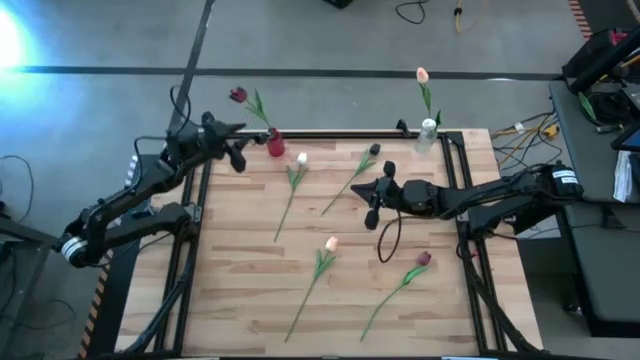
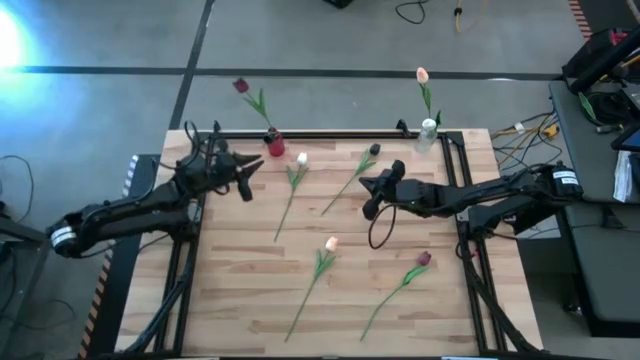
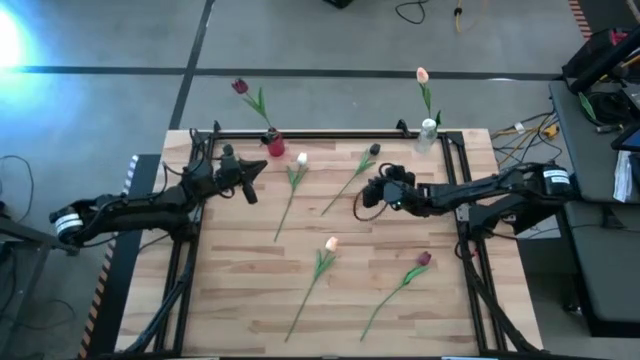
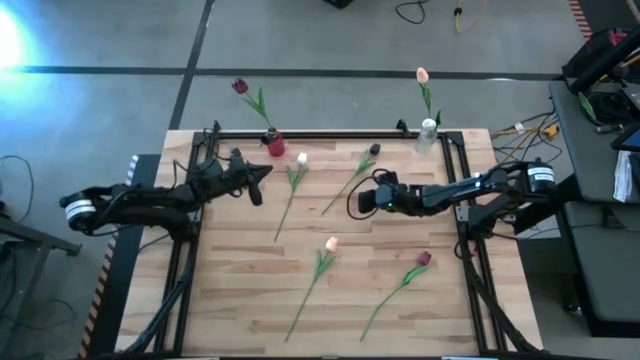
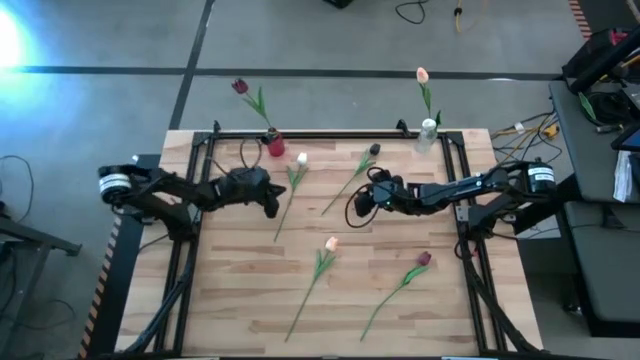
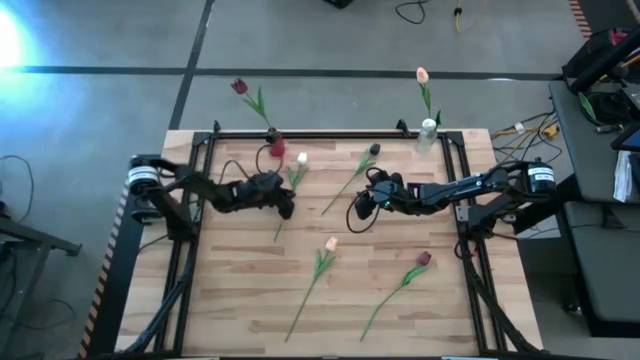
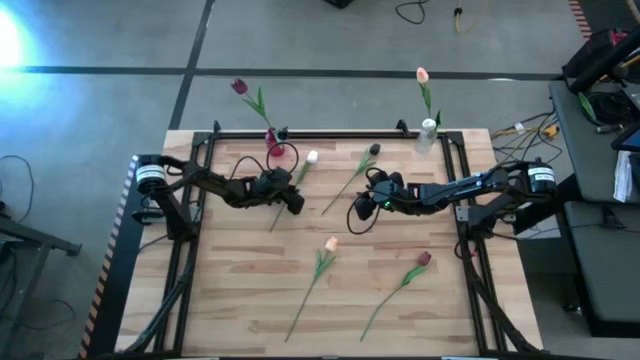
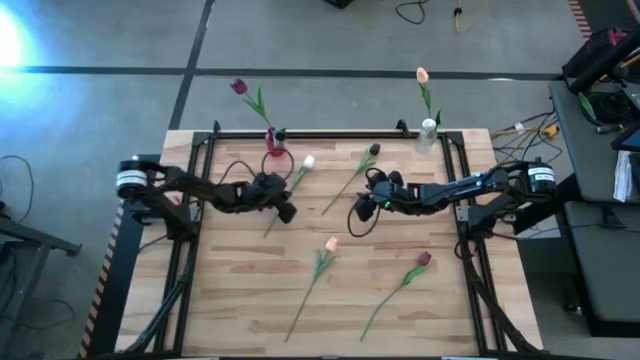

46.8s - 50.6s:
Task: Sort flowers into vase by color
Put the white tulip into the transparent vase

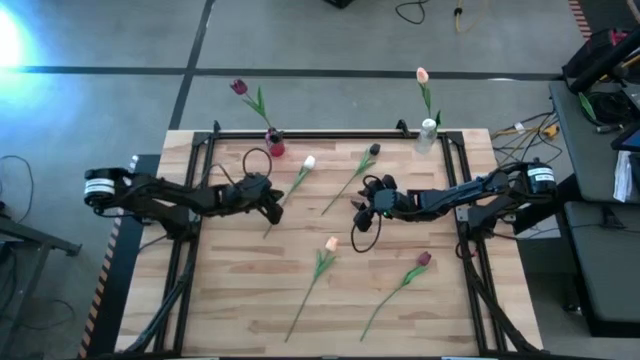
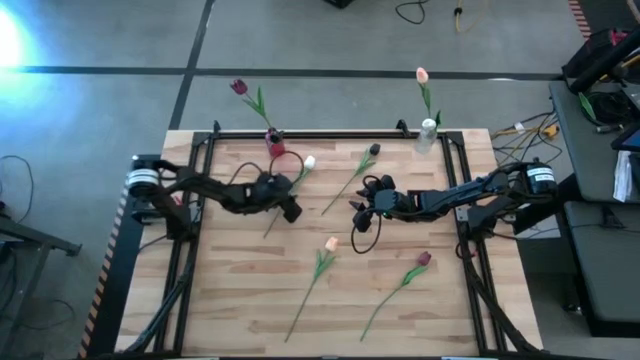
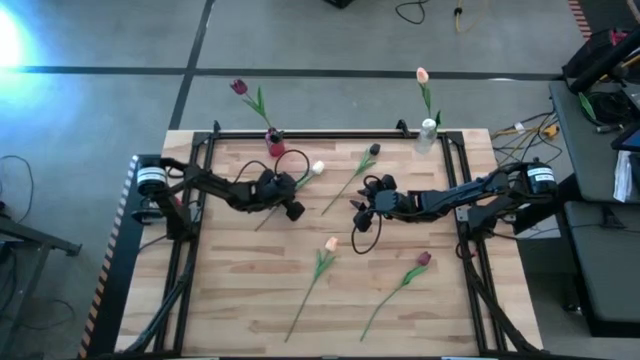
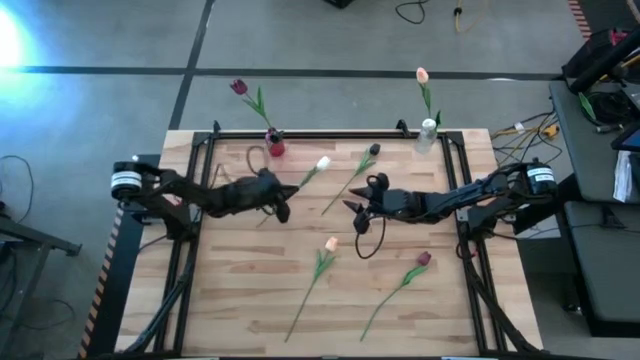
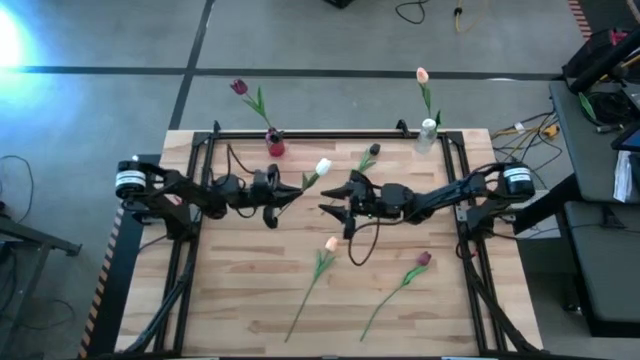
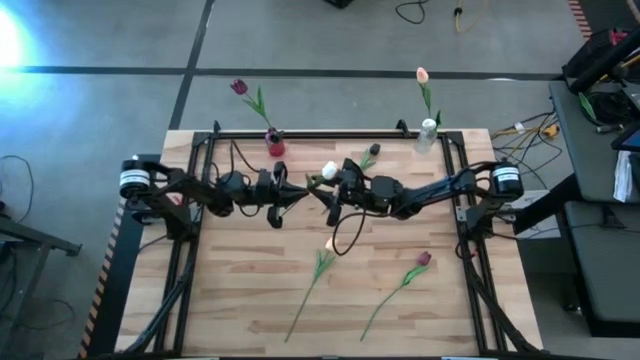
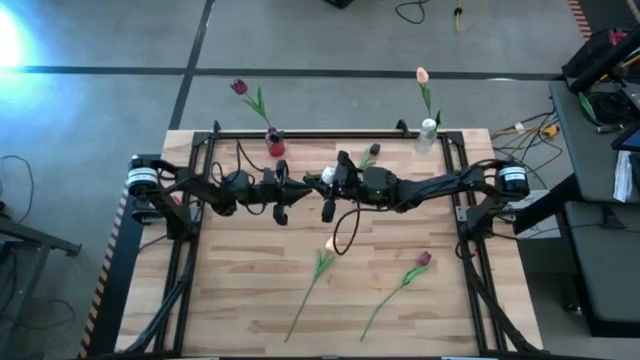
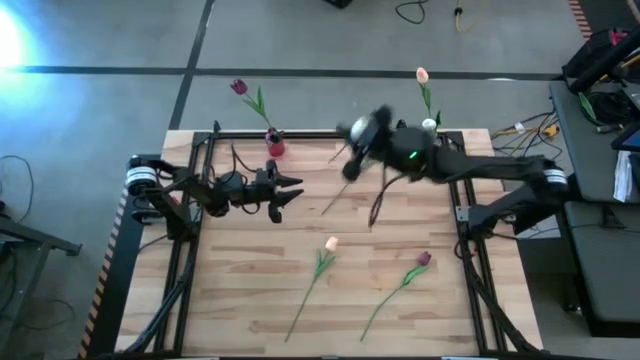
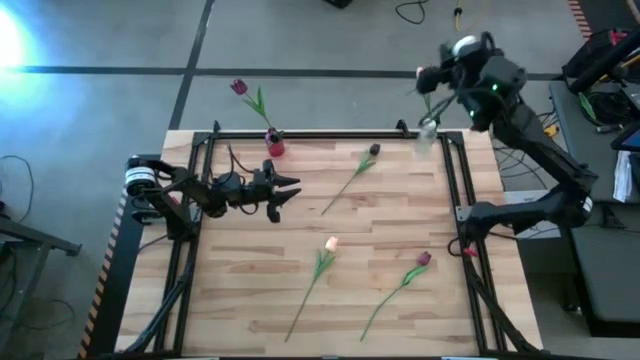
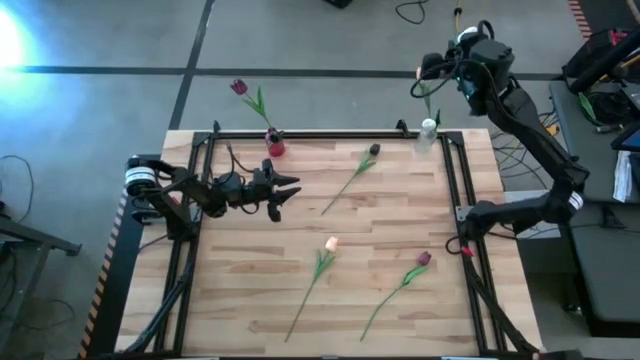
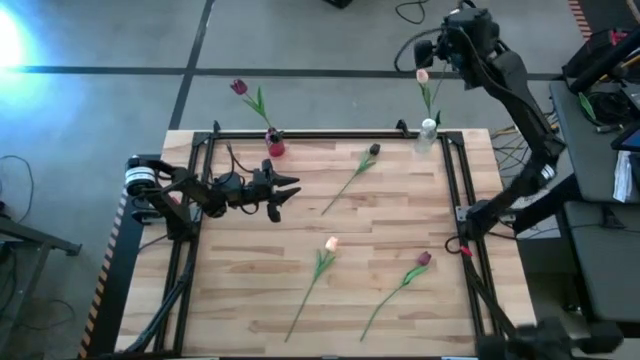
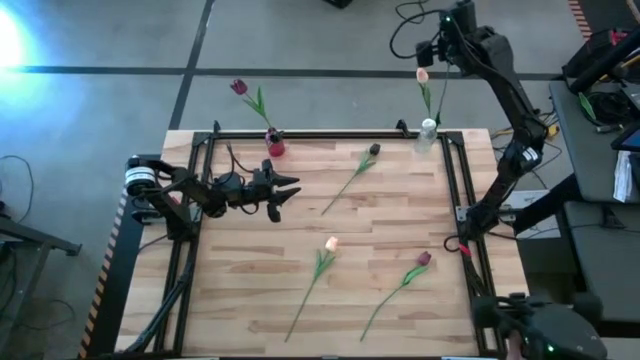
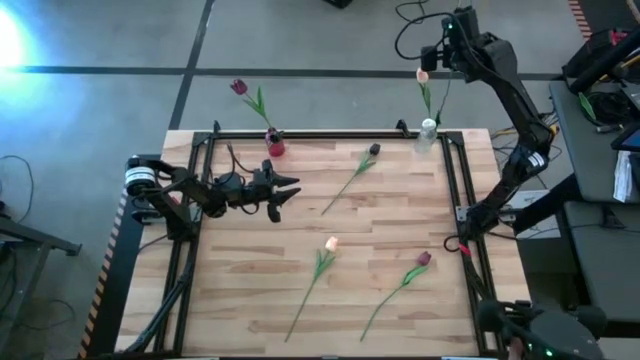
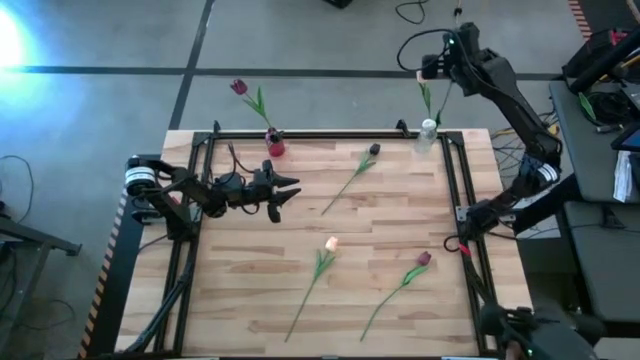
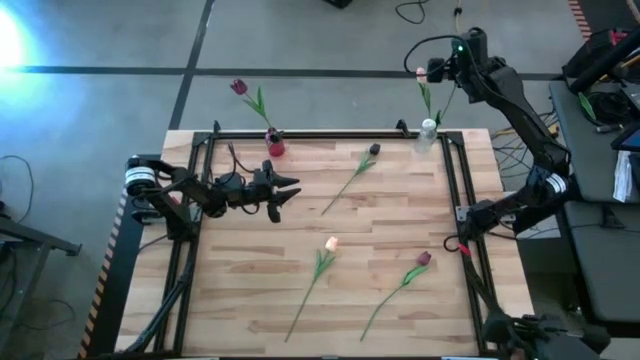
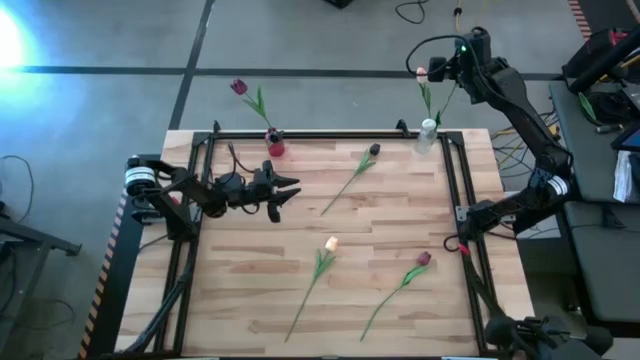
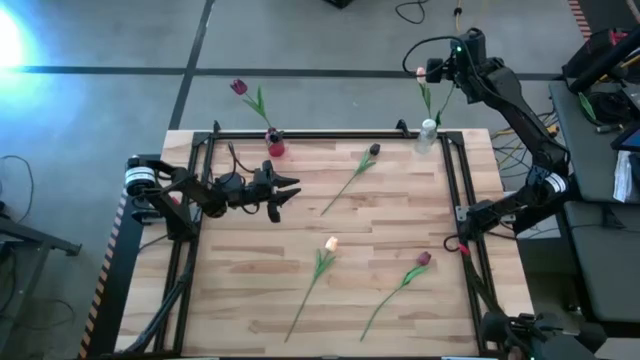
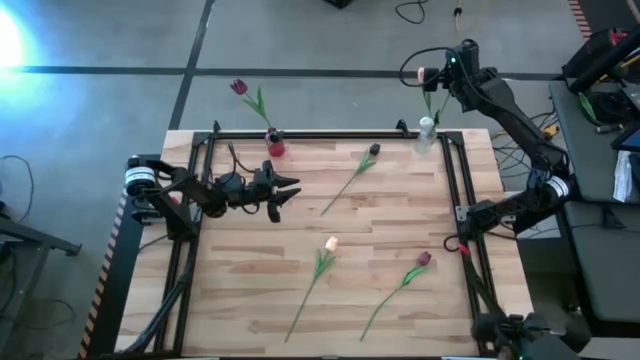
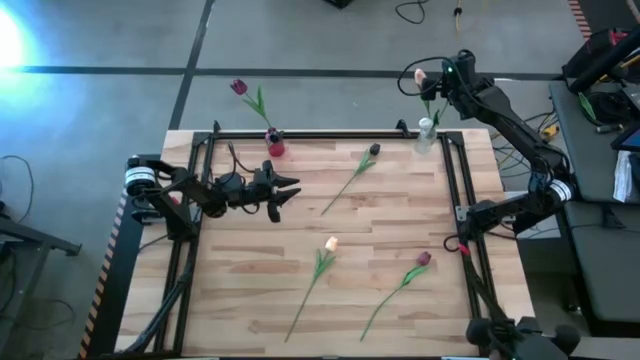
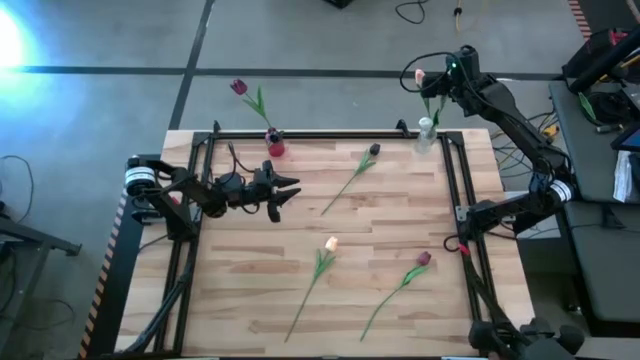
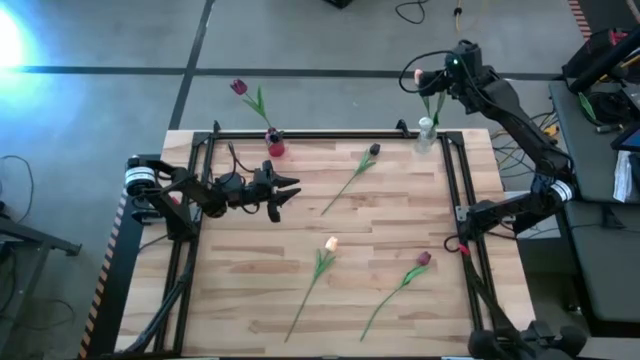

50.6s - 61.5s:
Put the white tulip into the transparent vase

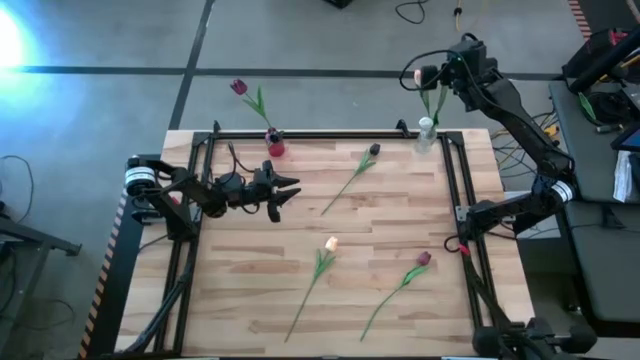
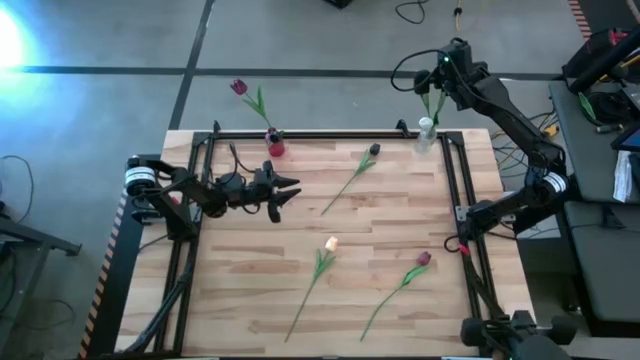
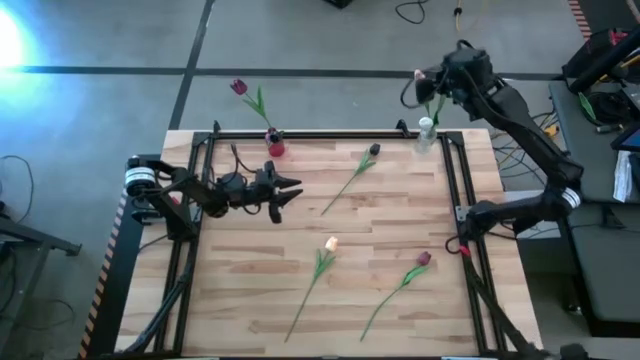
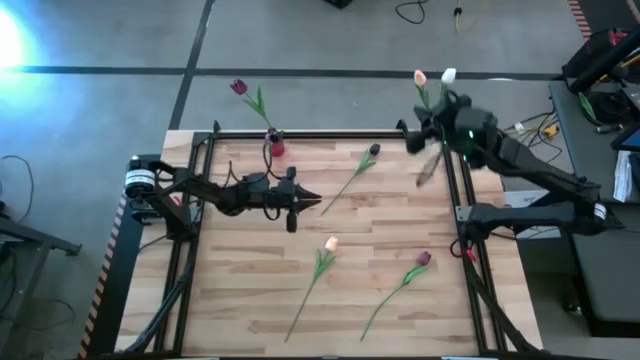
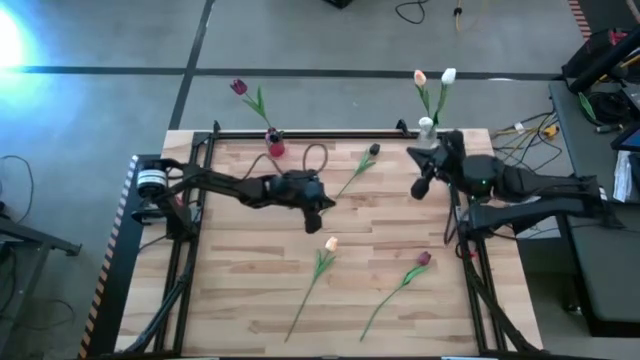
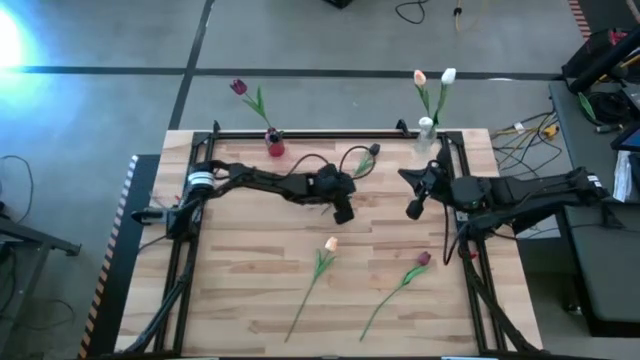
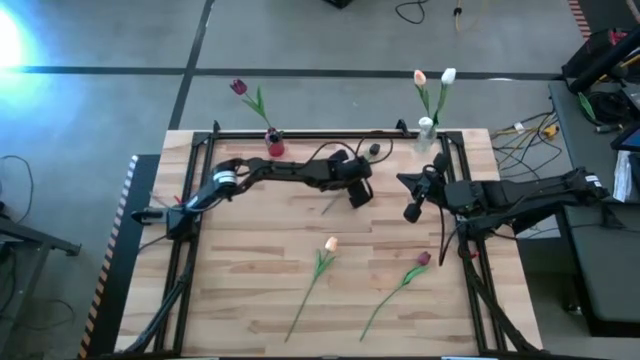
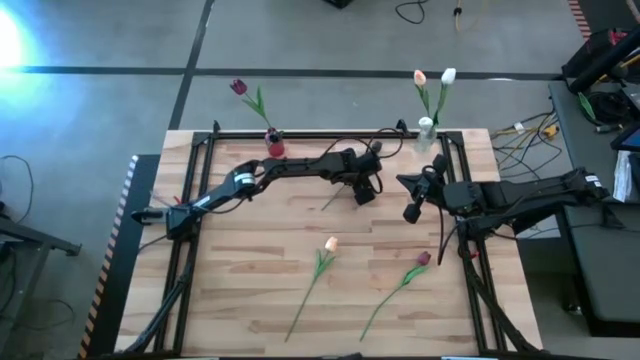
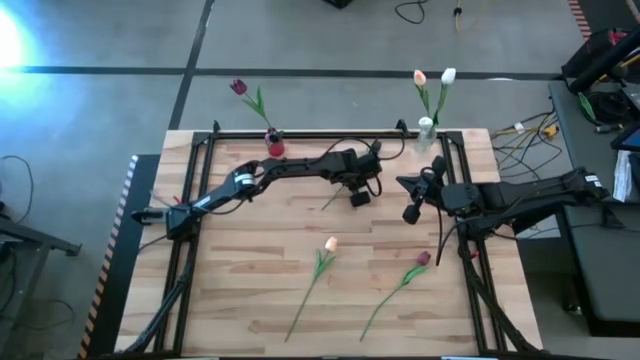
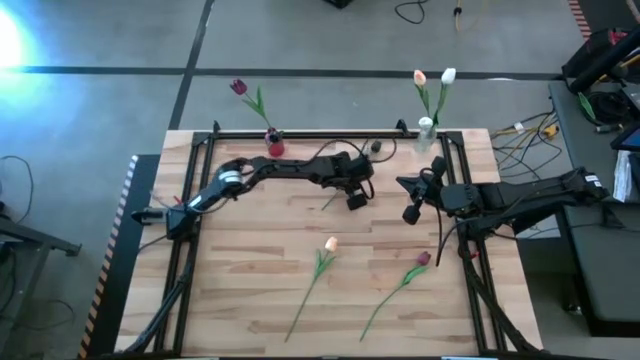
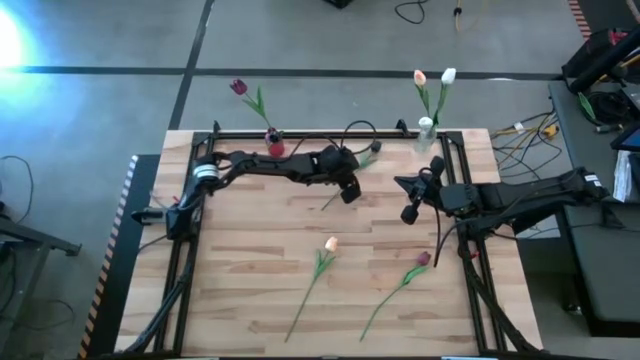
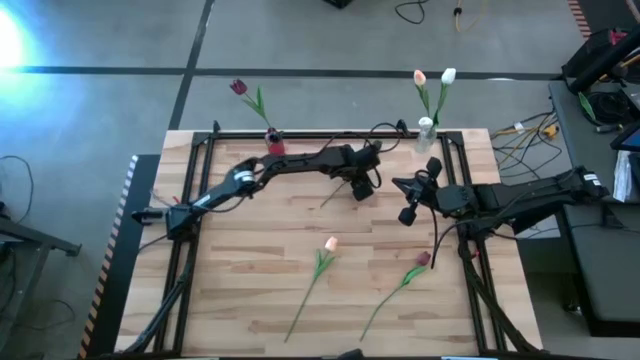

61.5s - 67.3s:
Put the black tulip into the red vase

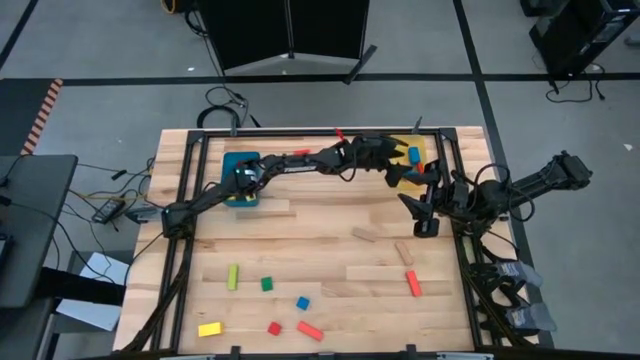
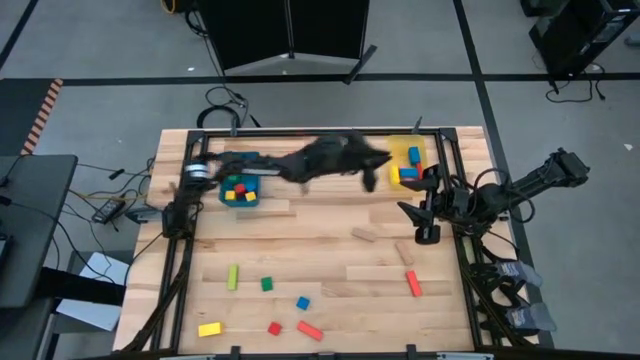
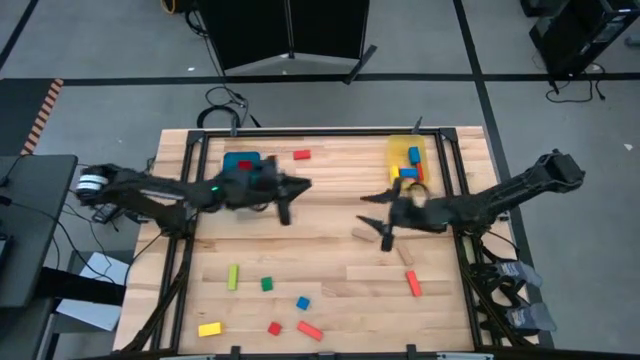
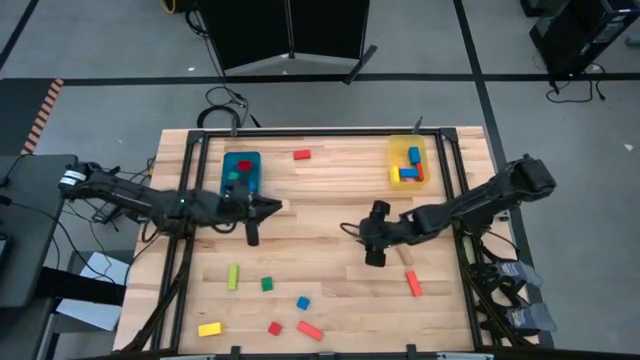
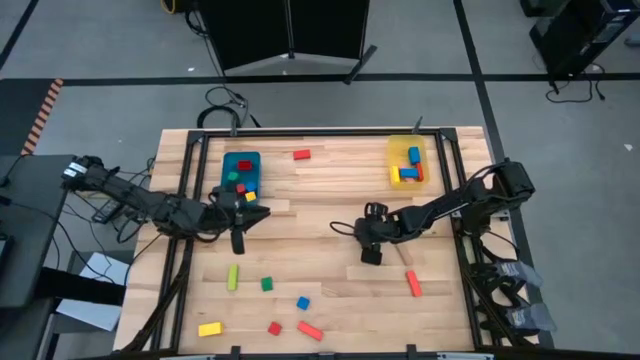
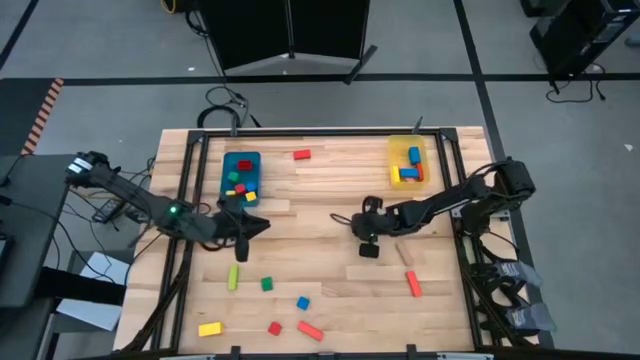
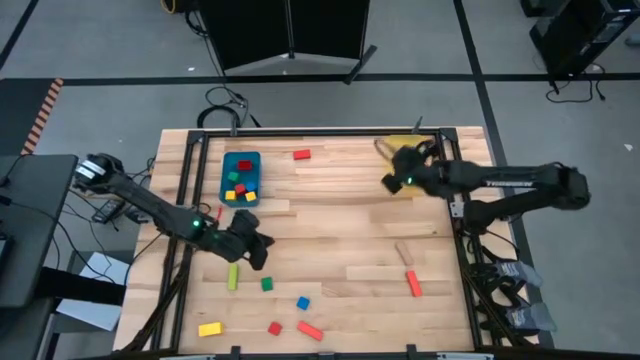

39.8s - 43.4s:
Task: Sort blocks by size
Put the large light brown block into the yellow bin
